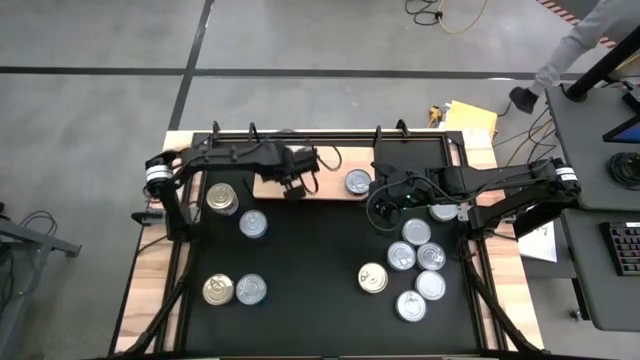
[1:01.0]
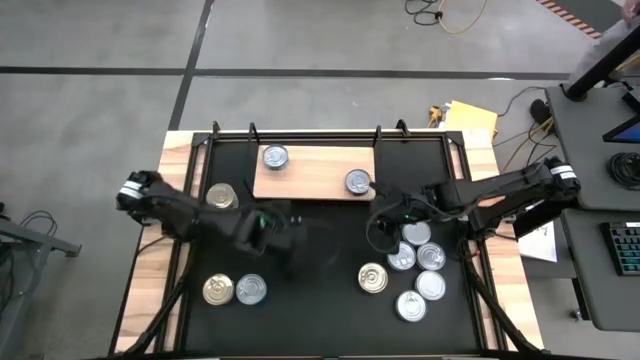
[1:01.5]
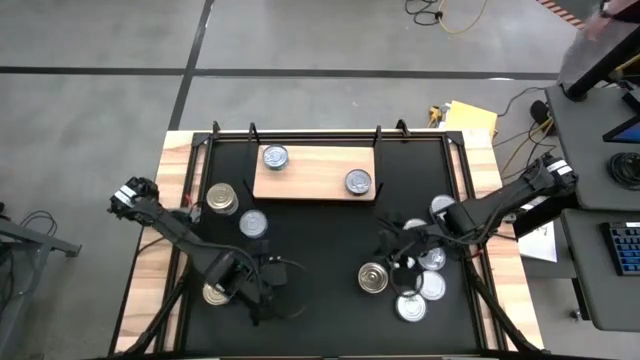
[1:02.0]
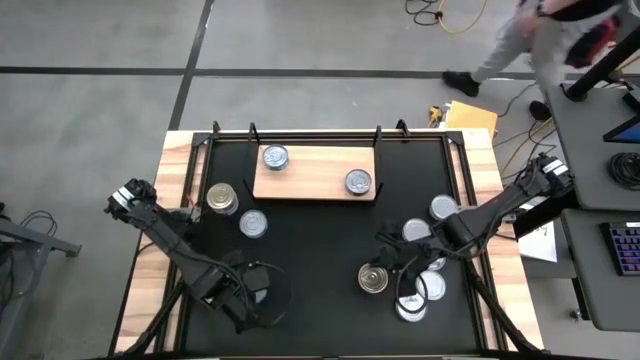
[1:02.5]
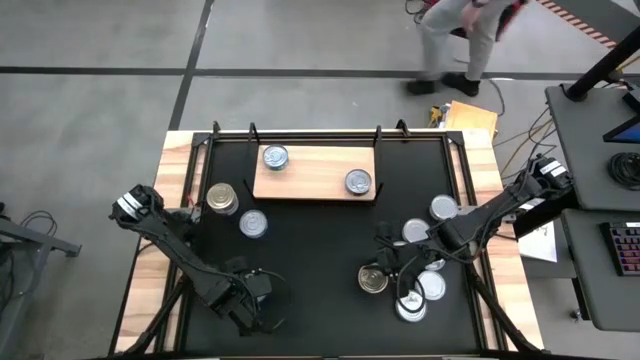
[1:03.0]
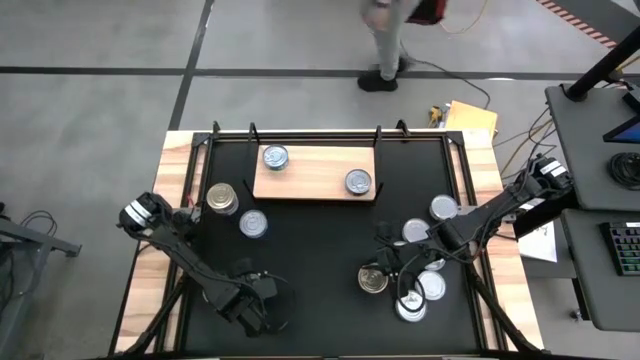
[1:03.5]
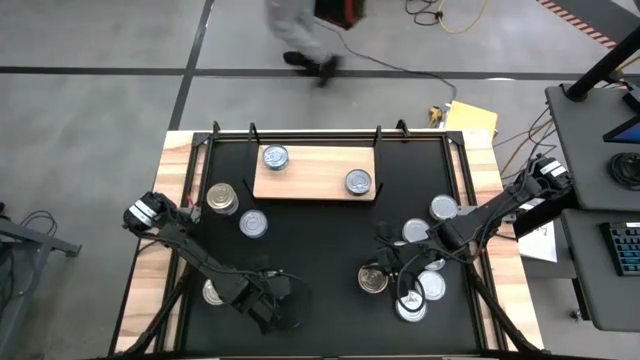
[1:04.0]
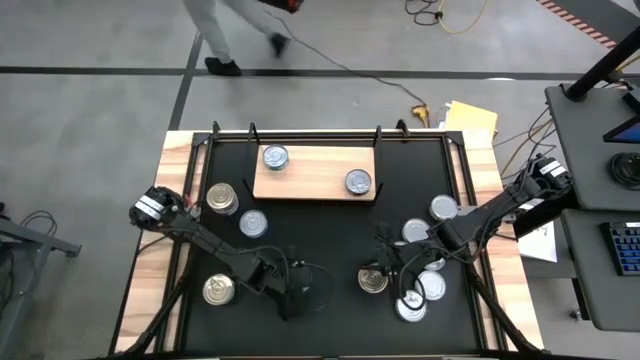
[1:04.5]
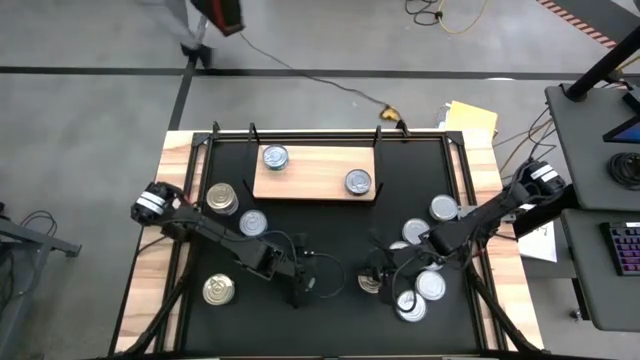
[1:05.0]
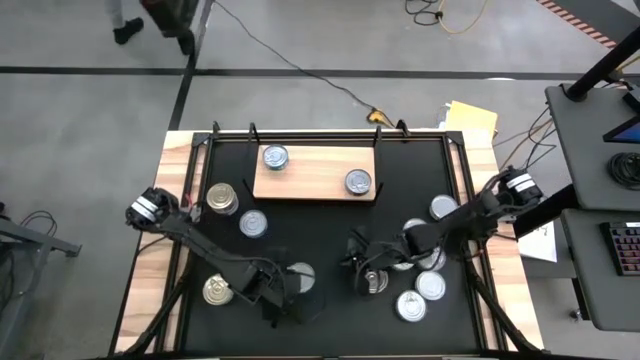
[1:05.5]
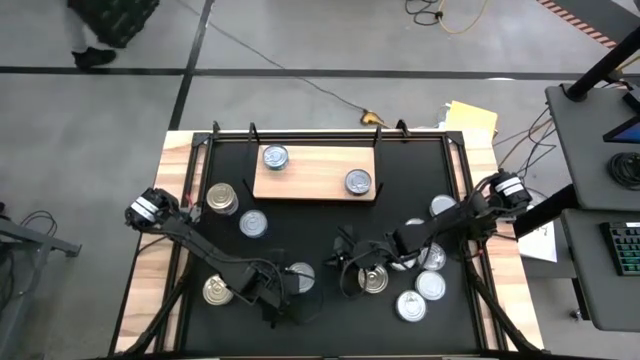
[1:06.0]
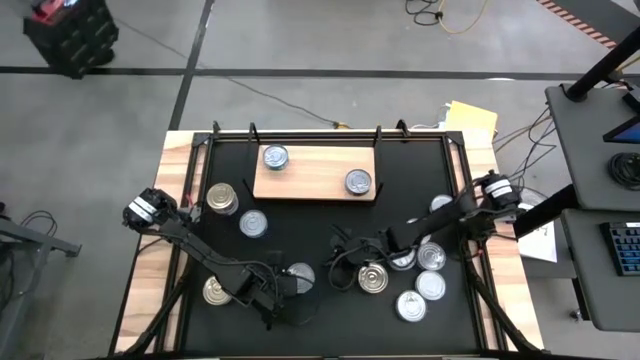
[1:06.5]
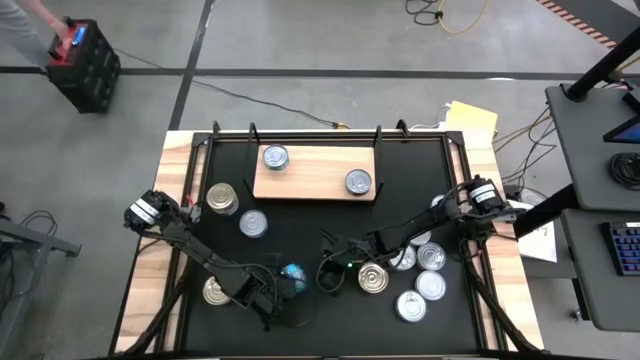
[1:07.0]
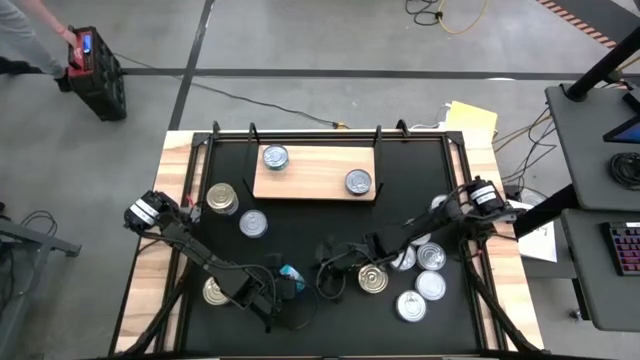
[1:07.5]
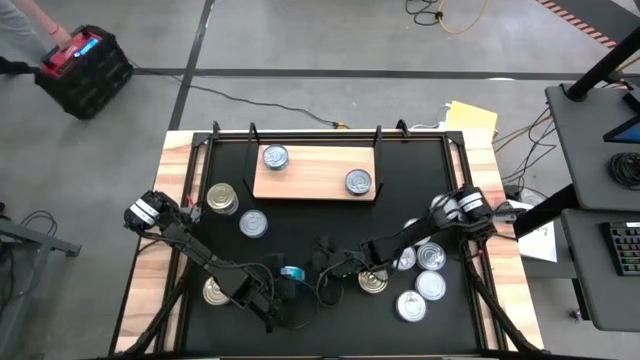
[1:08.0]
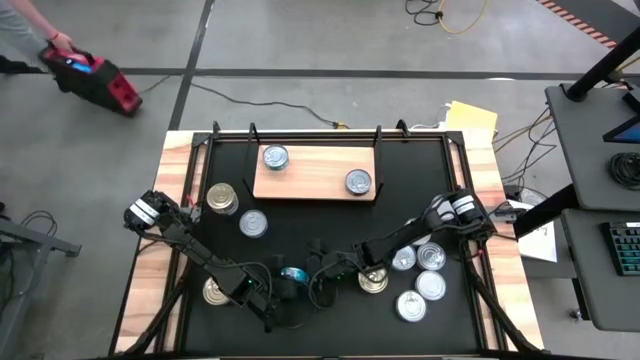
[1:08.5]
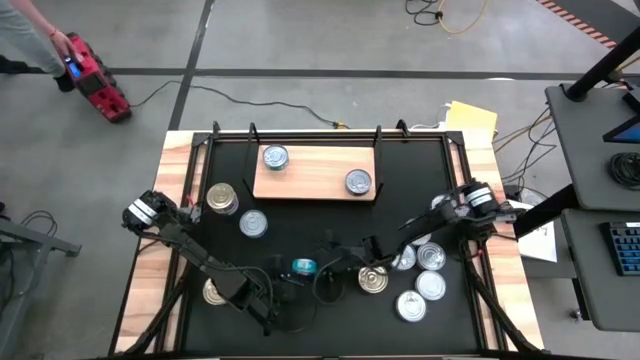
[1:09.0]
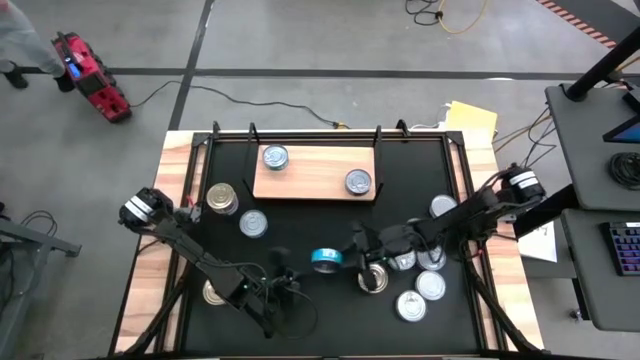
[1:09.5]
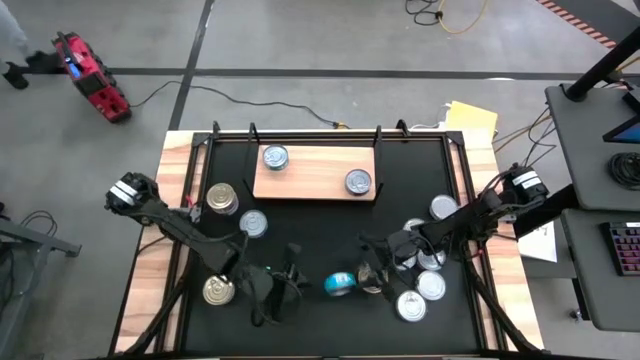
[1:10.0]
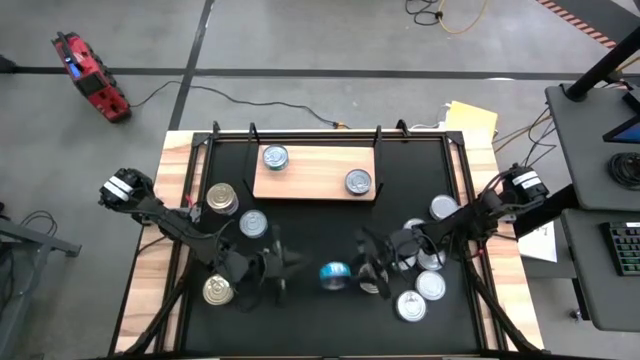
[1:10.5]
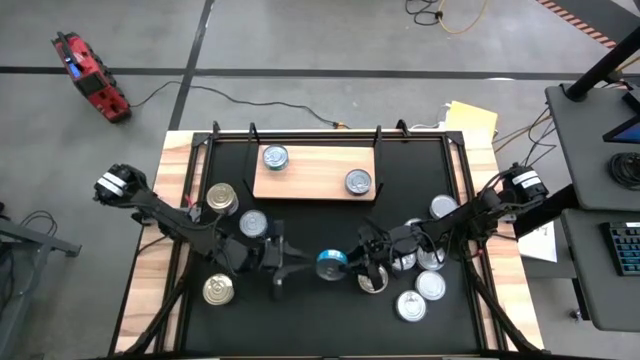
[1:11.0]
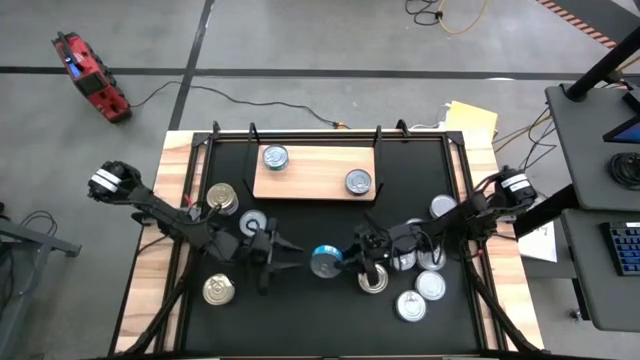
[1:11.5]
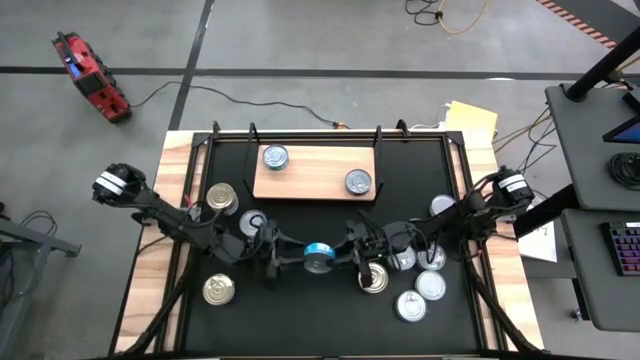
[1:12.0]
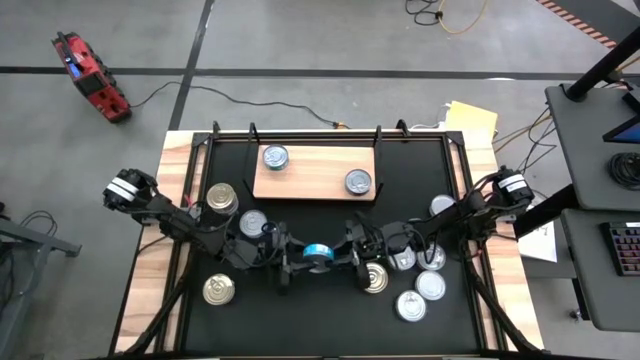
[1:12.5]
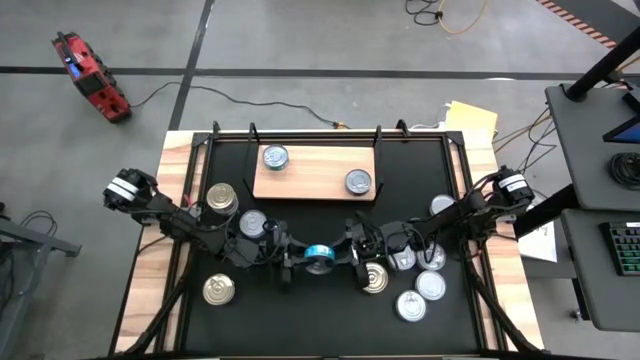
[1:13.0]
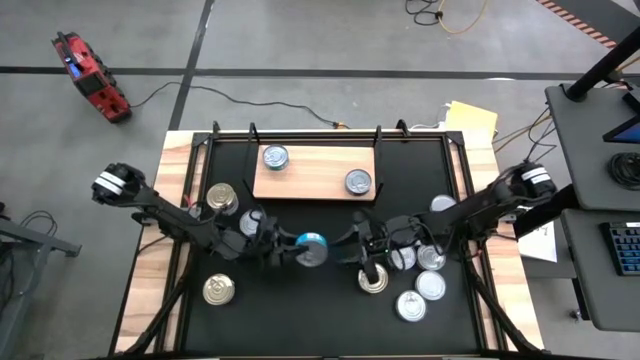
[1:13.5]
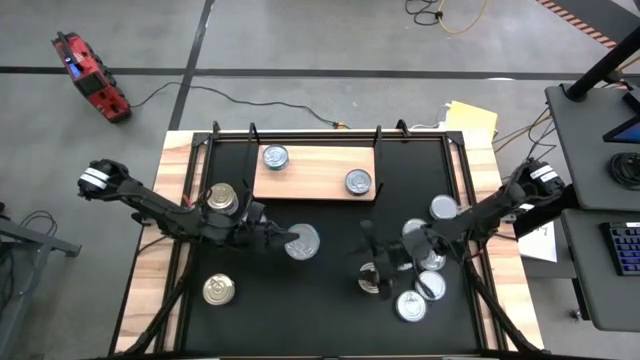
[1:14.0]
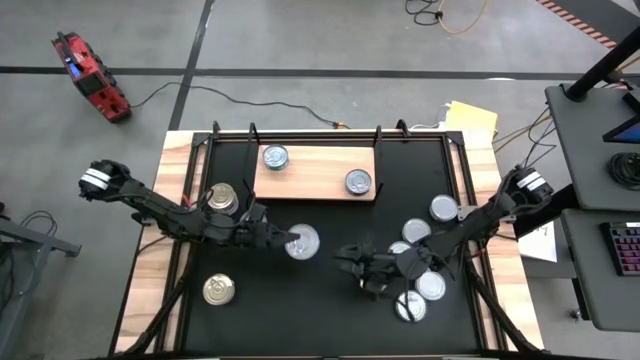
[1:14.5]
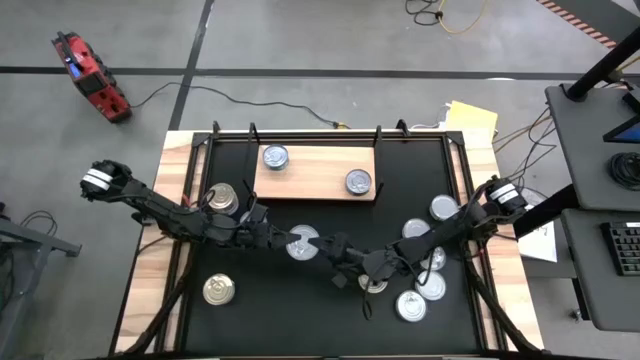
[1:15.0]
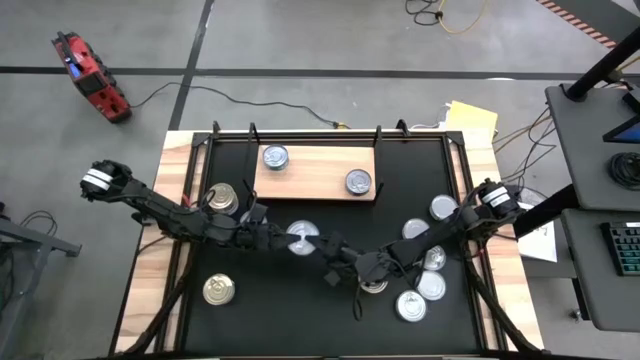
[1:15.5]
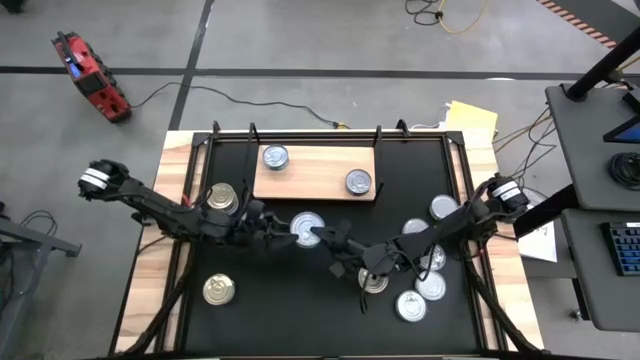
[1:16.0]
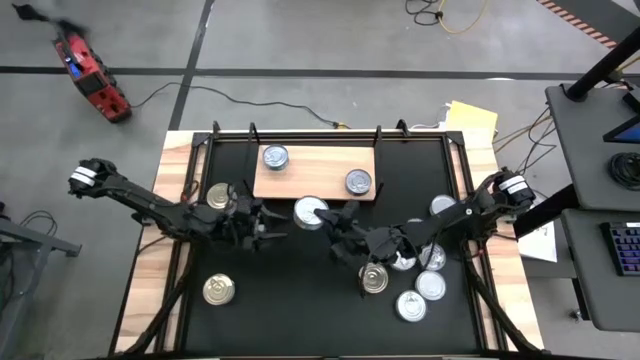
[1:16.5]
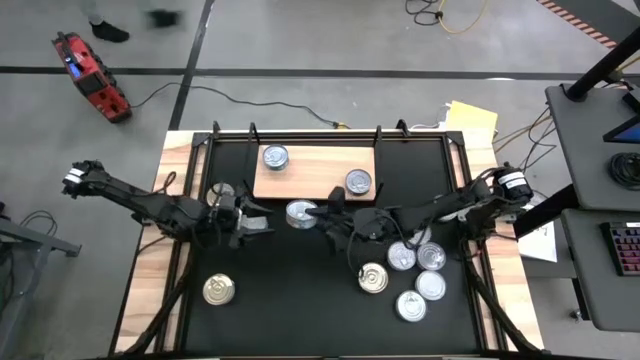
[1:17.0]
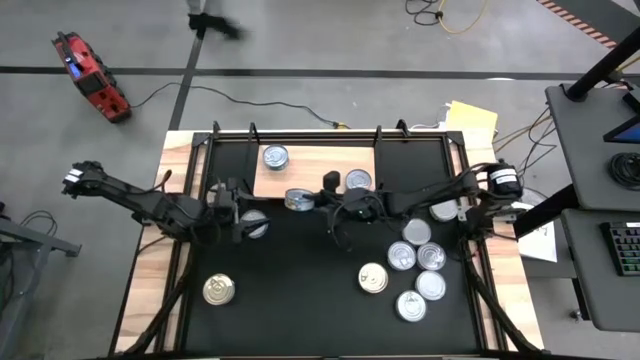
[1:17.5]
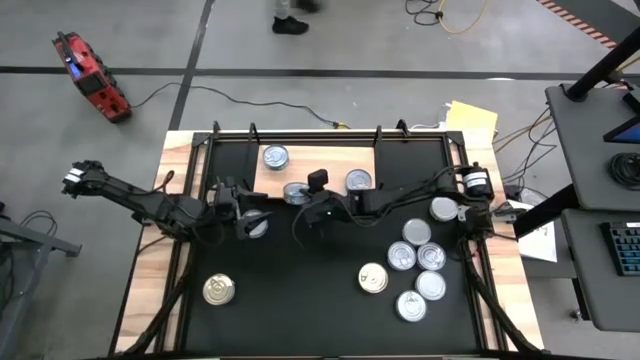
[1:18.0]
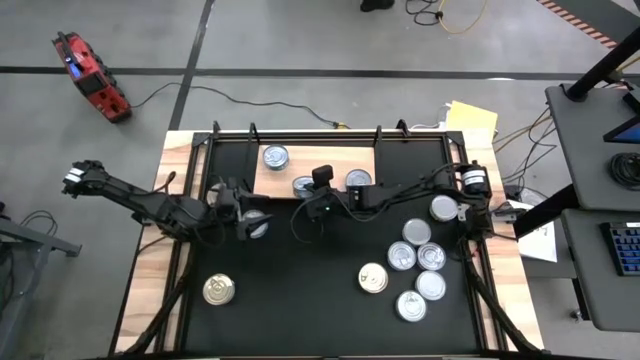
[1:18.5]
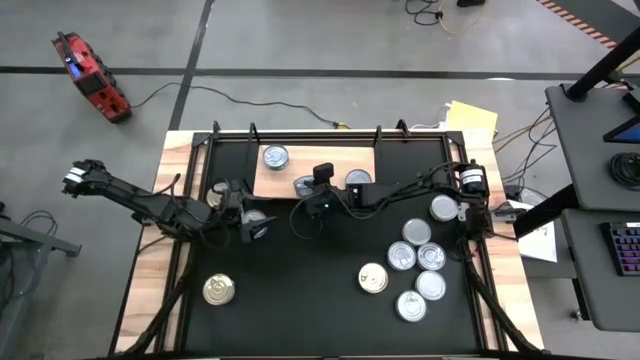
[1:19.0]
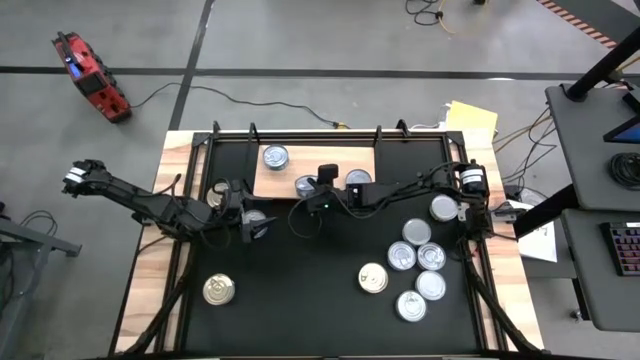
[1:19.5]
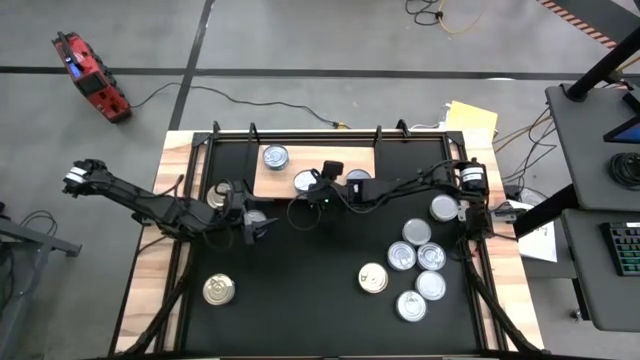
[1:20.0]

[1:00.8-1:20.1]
Task: Stack canned seafood by type on shelf
Put the yellow tuna can on the shelf

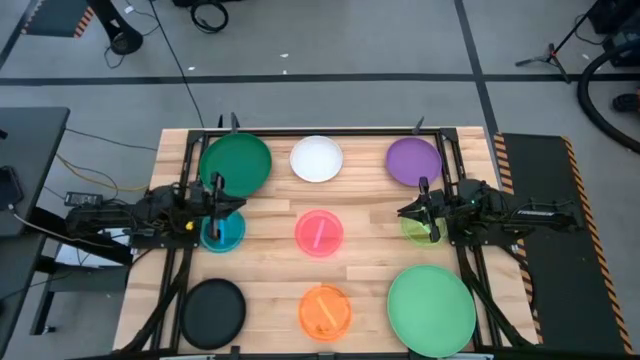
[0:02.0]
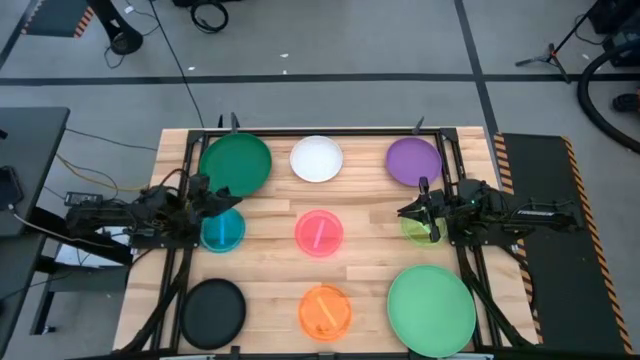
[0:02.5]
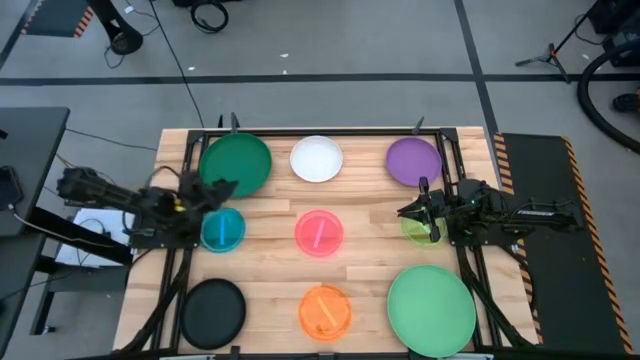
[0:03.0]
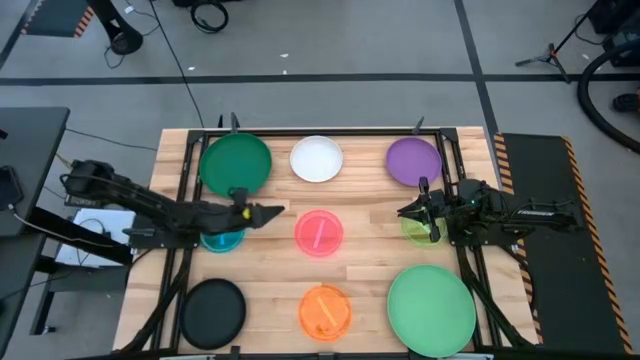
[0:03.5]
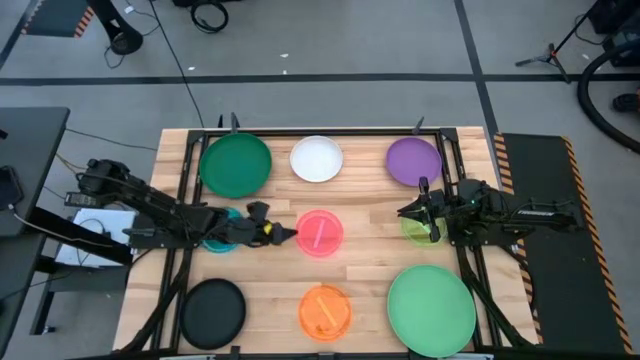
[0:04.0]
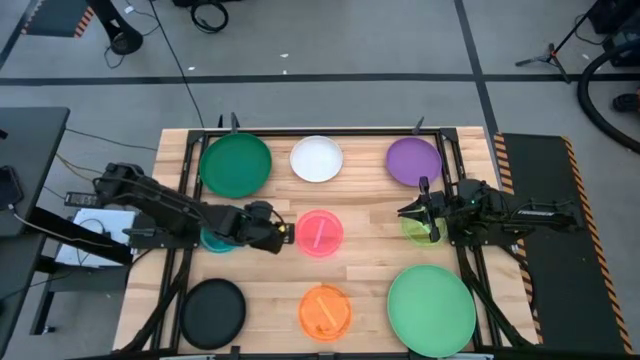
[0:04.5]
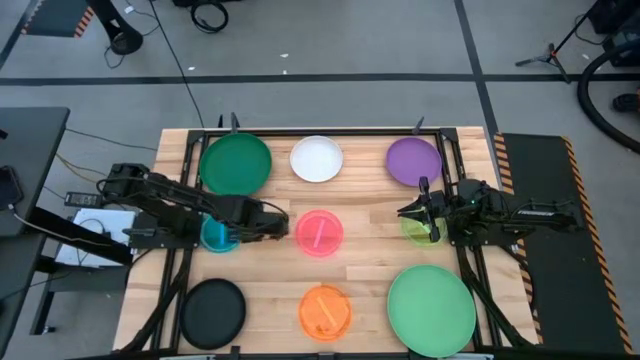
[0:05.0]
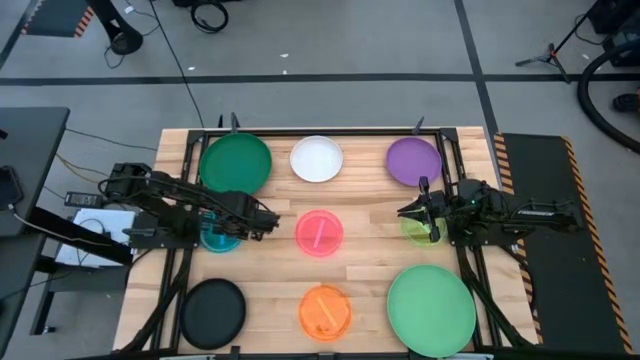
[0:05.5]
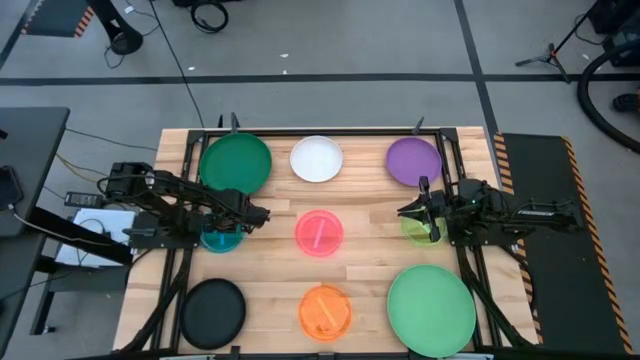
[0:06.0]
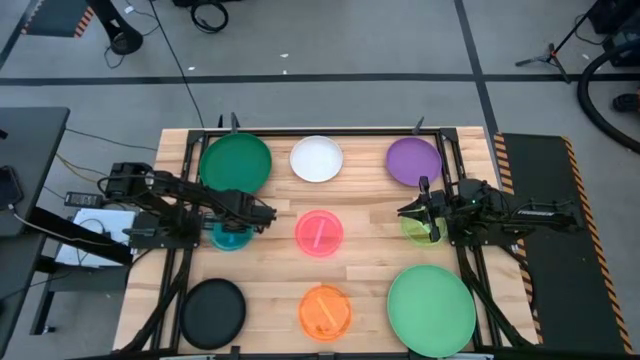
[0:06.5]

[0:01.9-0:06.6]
Task: Stack plastic plates
Adjust the transparent blue plate on the table
